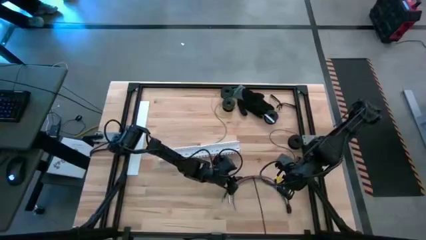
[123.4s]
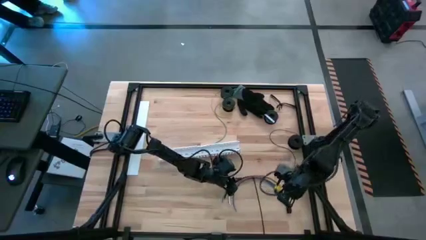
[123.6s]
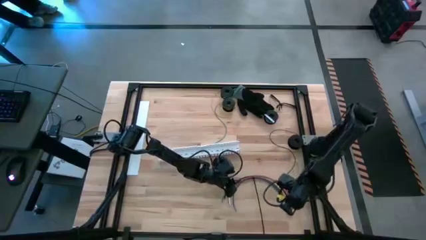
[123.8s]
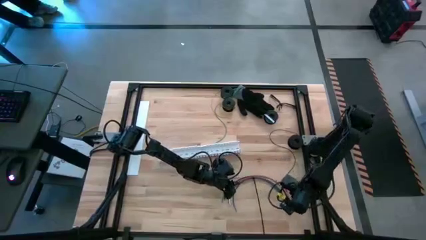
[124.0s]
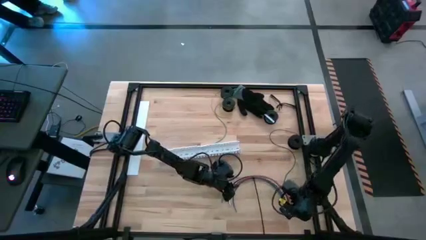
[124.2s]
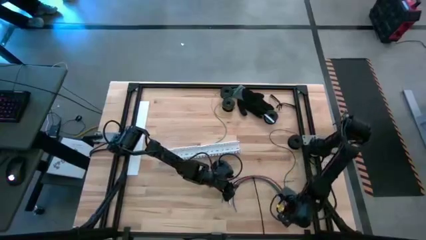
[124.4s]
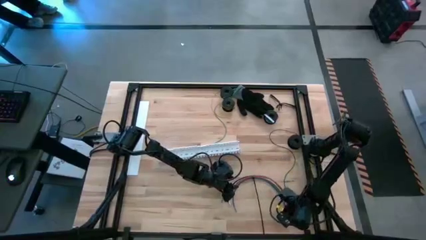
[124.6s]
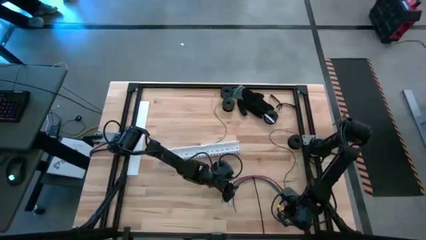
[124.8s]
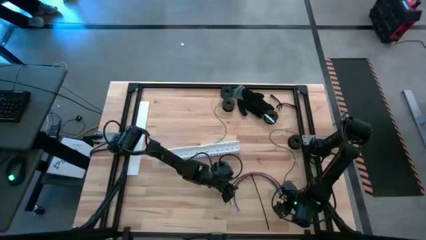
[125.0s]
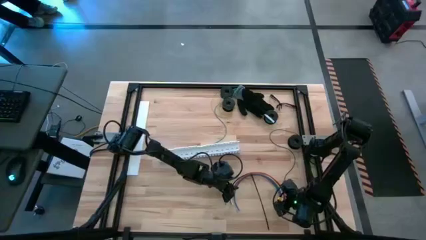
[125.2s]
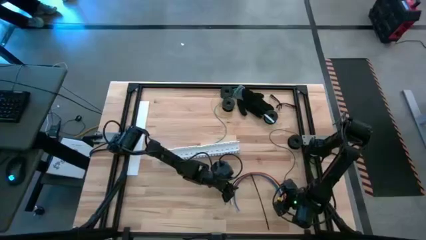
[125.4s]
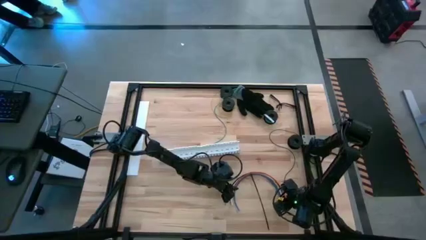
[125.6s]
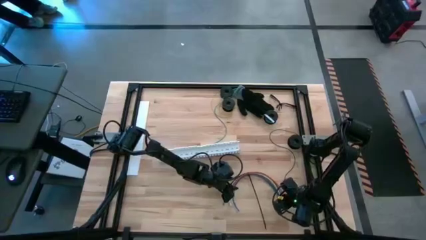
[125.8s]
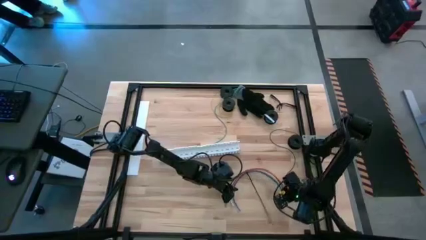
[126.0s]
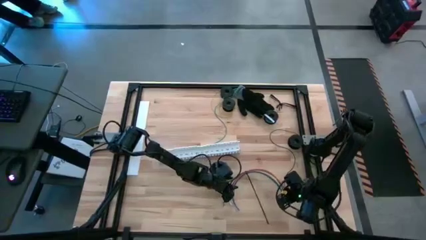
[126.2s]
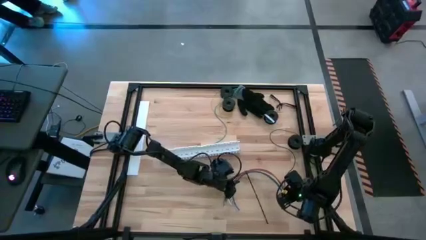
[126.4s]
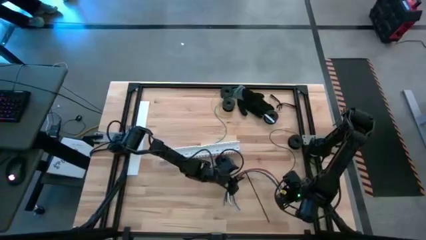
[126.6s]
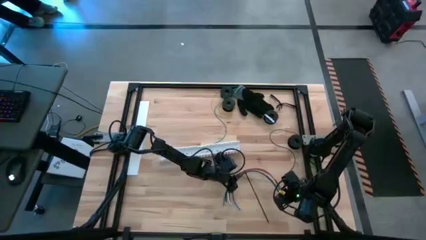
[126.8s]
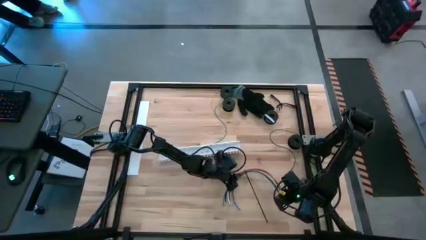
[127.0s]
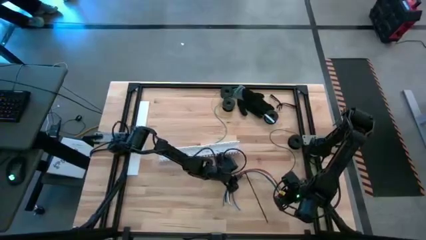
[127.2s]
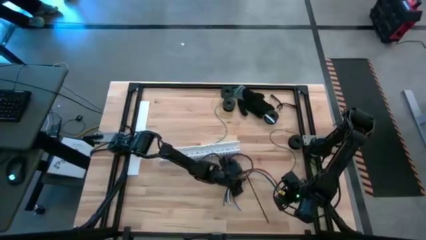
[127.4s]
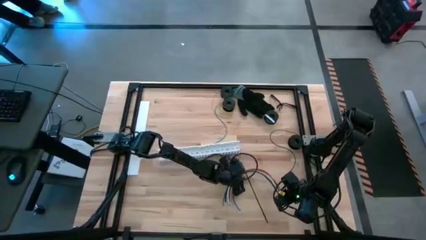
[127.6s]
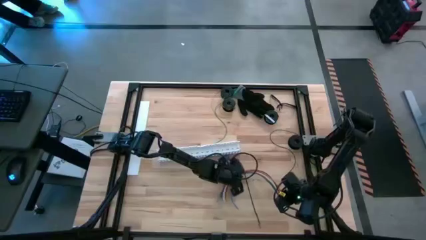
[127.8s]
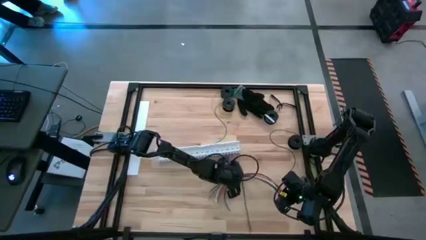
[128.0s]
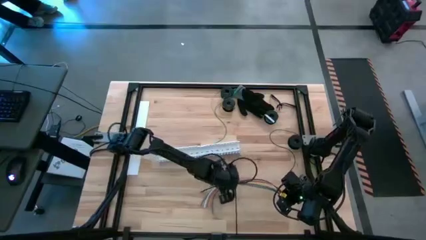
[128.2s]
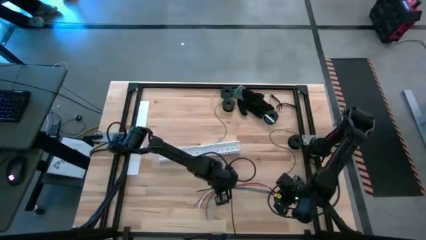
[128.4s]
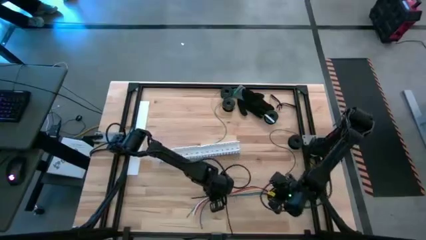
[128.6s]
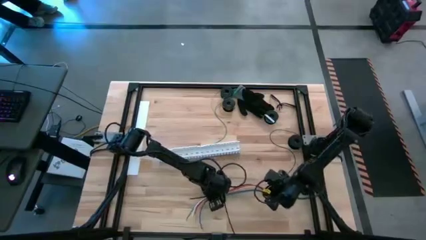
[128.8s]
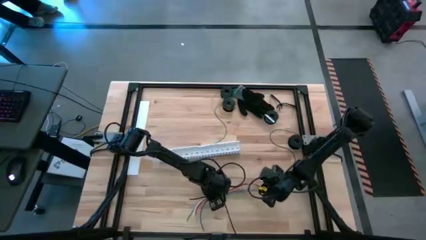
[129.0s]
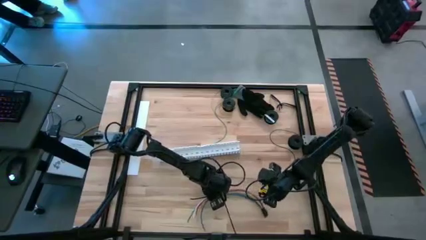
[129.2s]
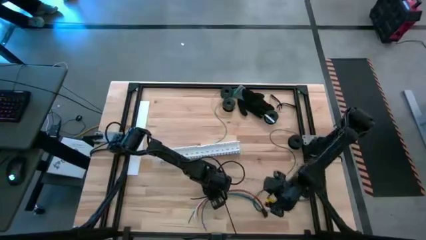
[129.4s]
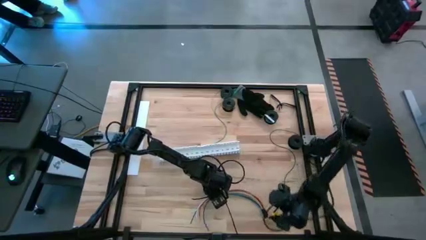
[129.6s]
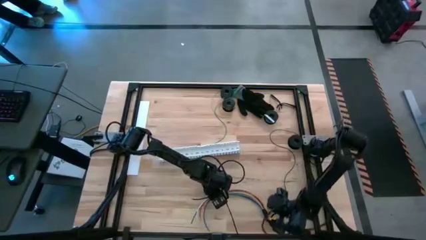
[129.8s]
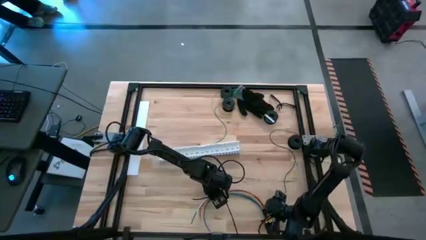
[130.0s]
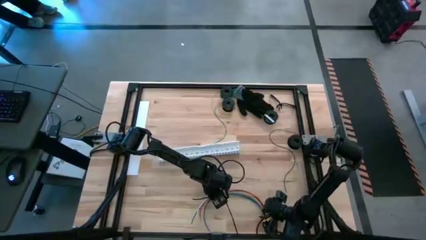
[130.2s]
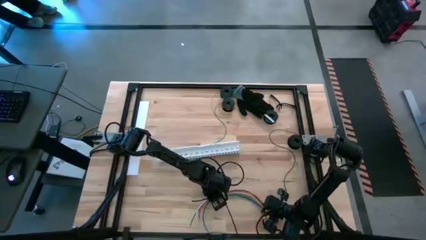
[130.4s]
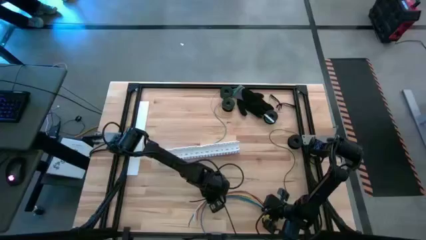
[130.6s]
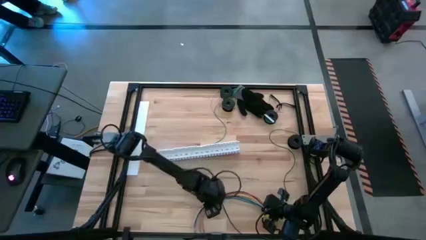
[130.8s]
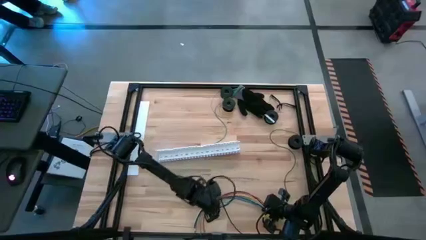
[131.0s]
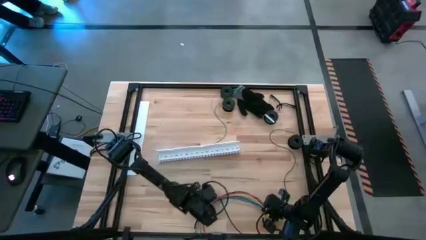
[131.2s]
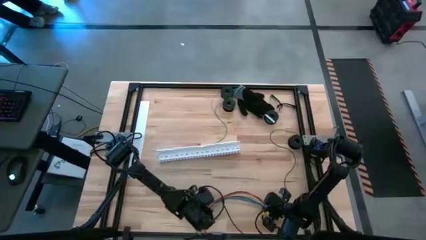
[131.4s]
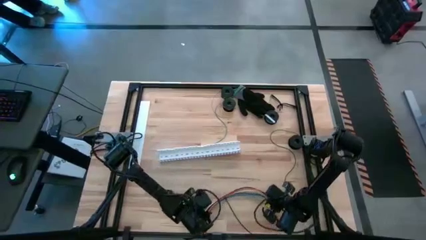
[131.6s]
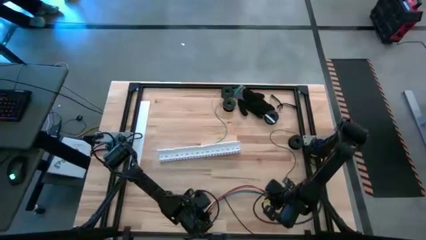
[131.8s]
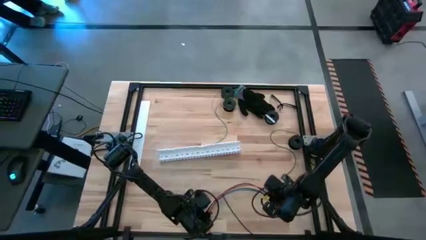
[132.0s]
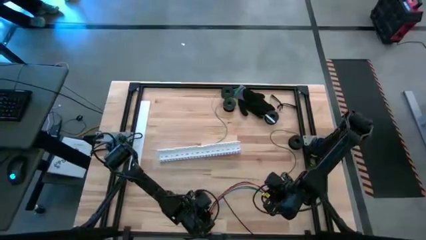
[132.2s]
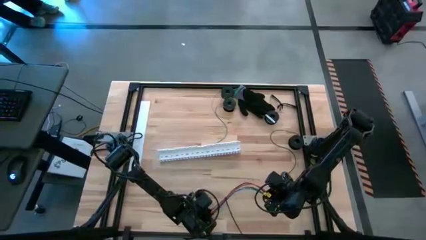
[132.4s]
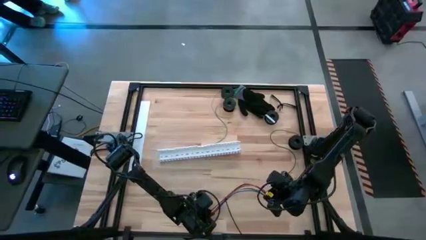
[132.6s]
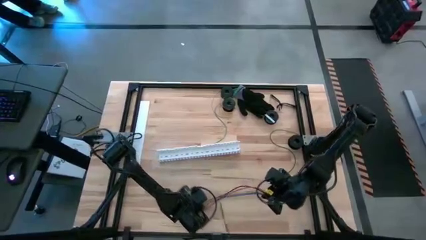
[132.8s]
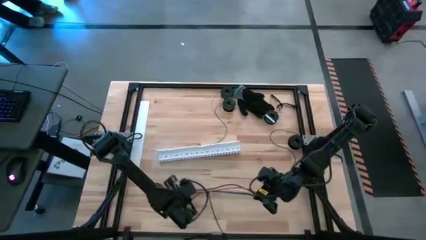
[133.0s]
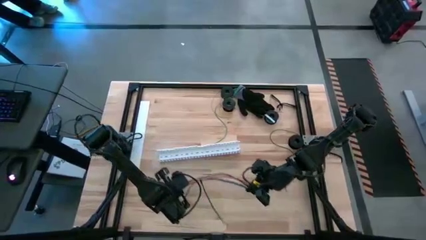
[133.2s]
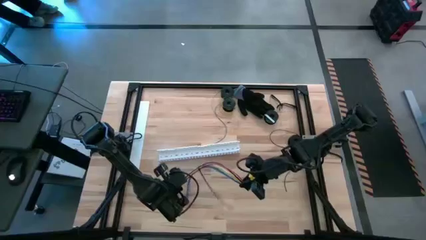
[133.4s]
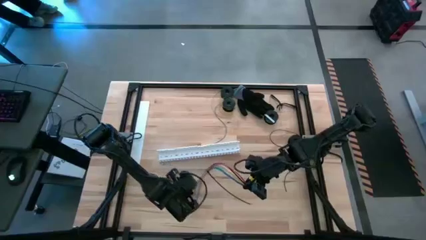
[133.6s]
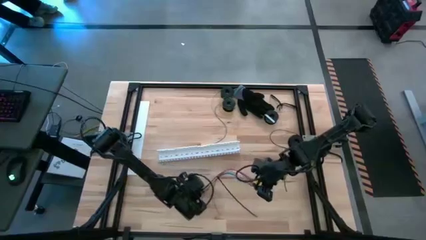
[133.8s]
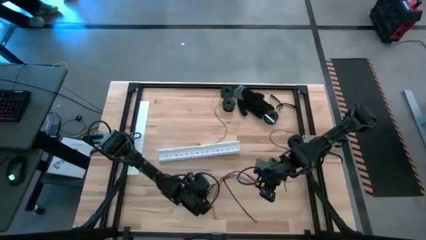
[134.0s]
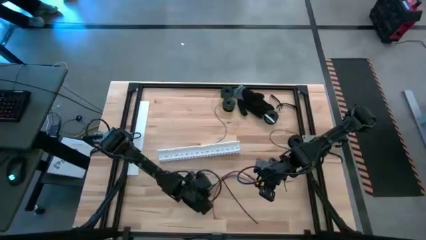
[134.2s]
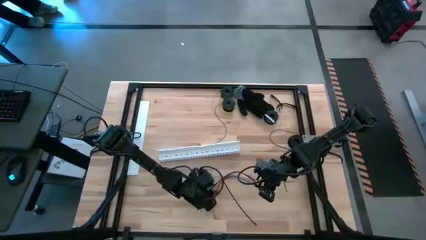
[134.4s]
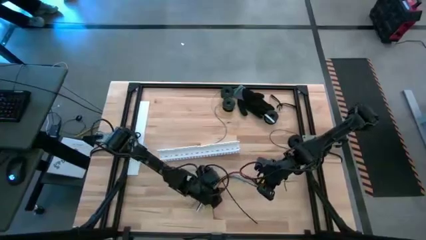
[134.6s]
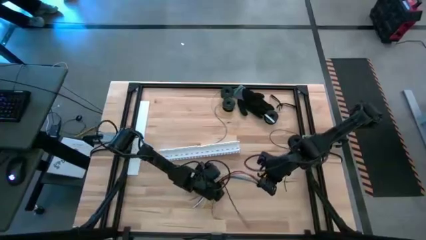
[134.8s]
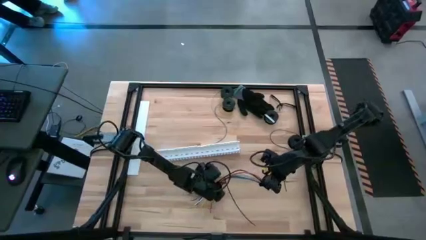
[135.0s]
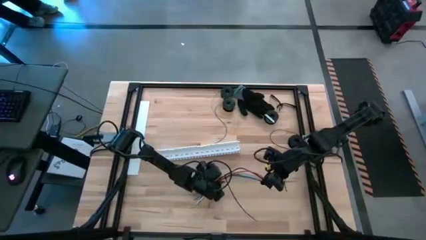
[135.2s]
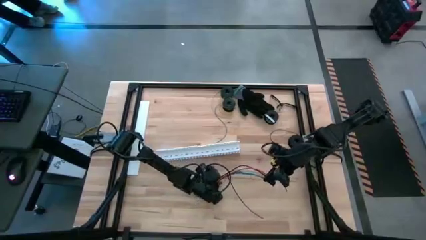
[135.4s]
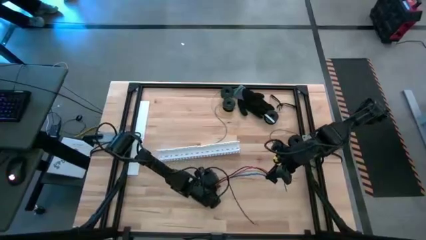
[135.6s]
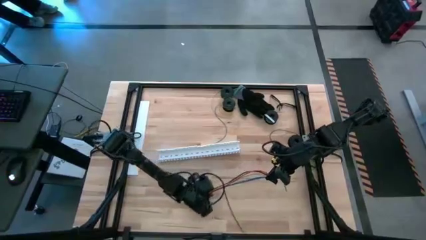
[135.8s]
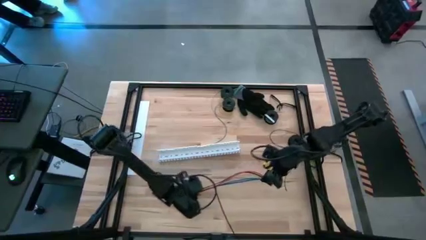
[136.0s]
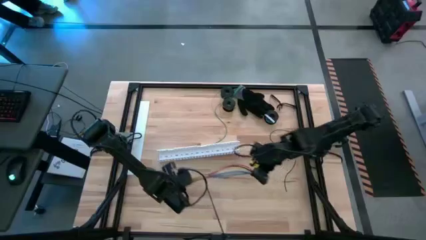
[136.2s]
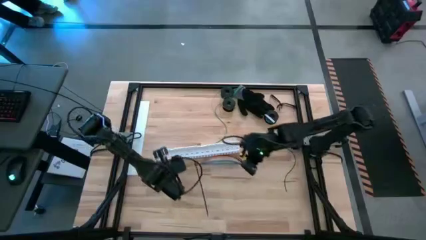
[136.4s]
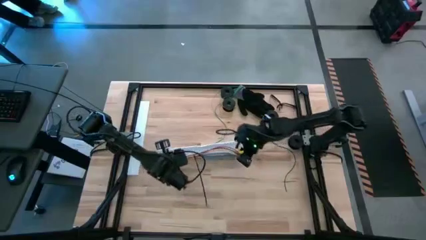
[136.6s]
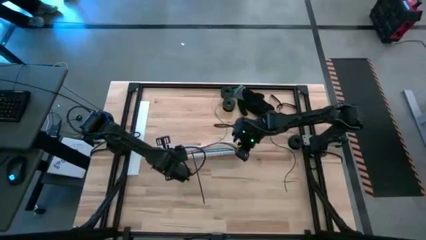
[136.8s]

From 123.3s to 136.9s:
Task: Ziptie cables
Put ziptied cables in a white cable duct

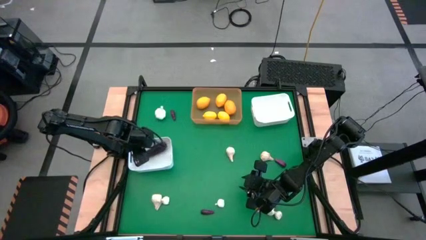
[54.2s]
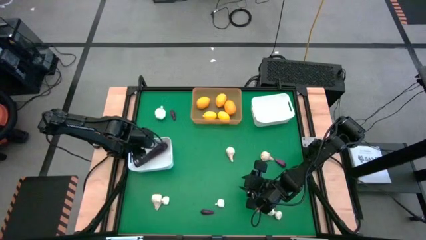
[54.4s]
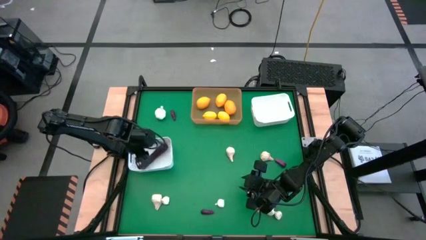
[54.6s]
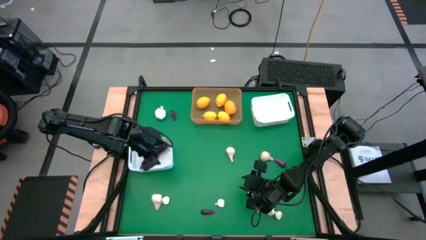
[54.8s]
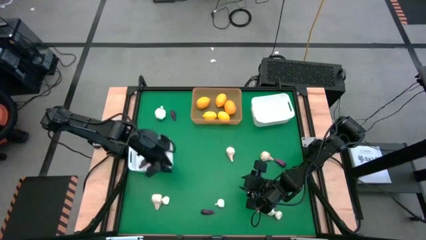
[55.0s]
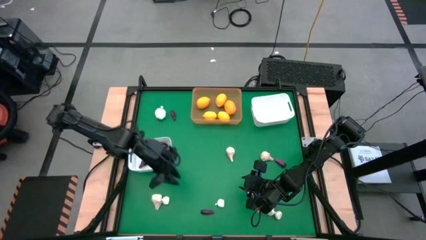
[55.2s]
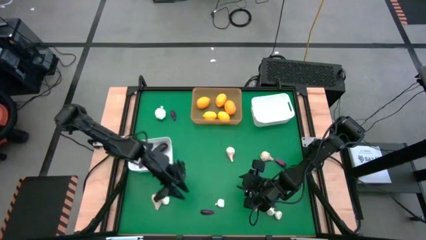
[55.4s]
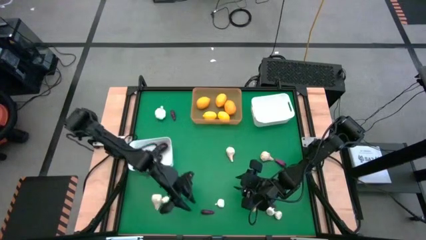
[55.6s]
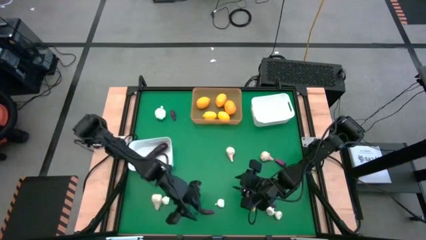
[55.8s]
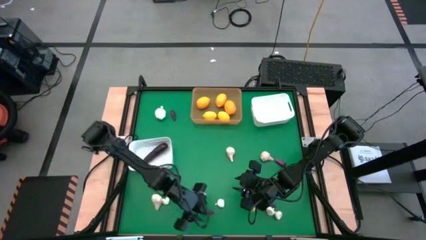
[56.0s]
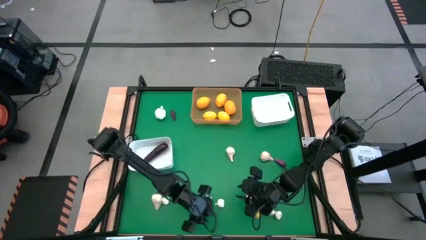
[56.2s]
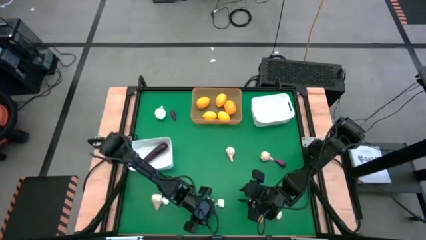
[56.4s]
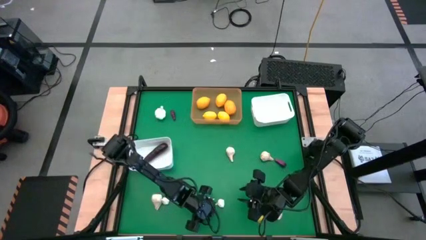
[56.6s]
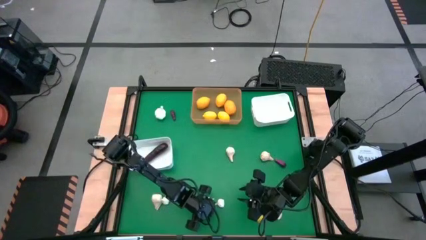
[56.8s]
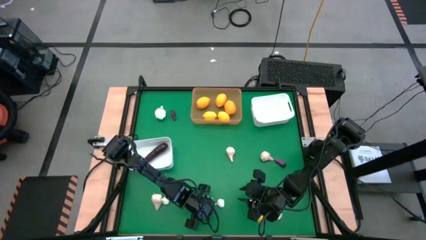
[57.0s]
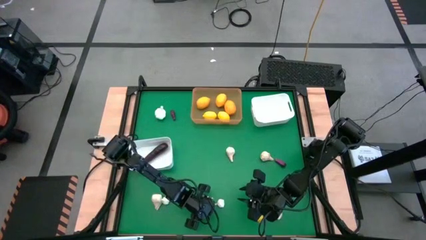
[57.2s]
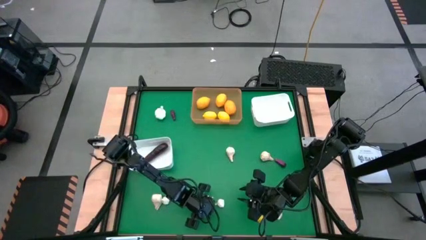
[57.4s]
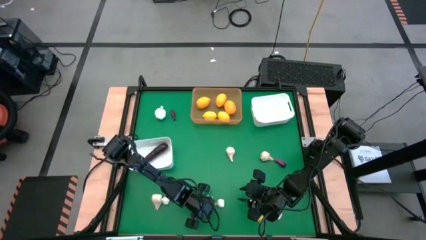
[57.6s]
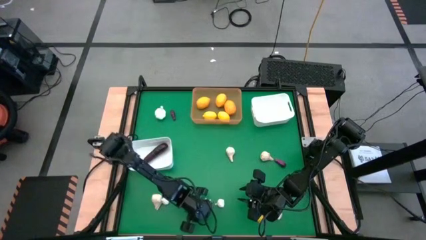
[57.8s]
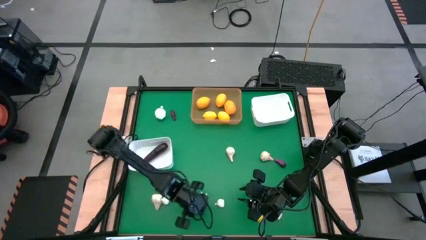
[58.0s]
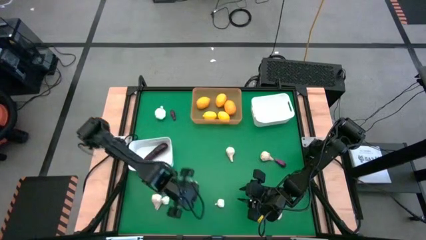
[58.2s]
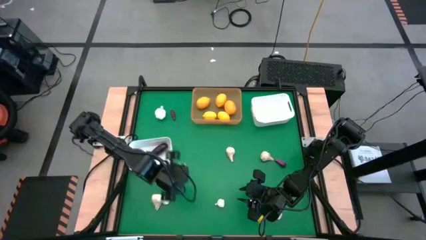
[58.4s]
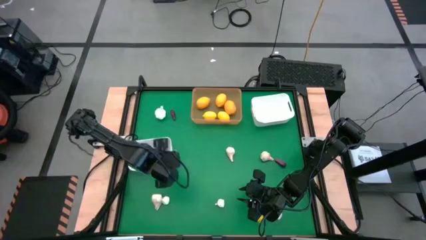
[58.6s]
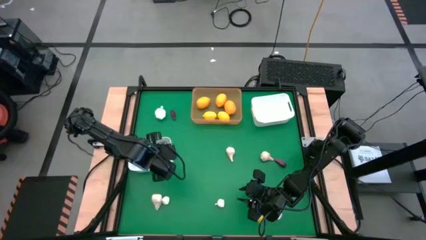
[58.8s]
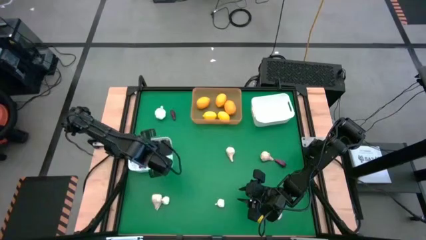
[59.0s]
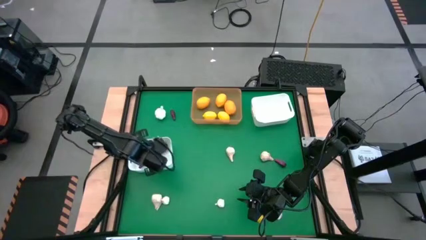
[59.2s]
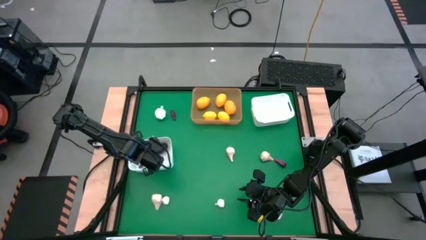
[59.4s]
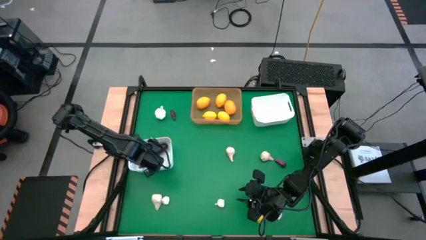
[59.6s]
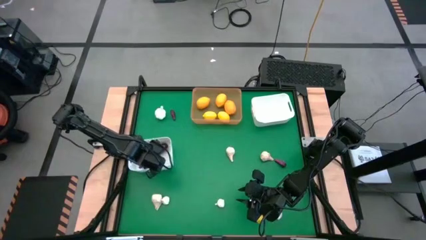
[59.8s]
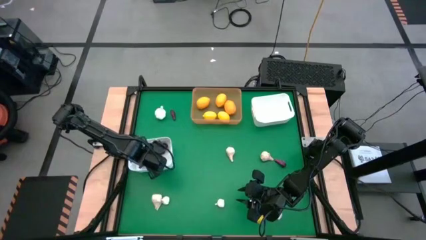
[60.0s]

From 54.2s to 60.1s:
Task: Sort produce into baskets
Put the eggplant into the left white bin
